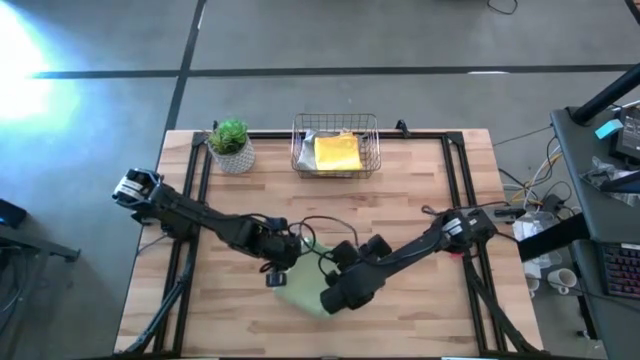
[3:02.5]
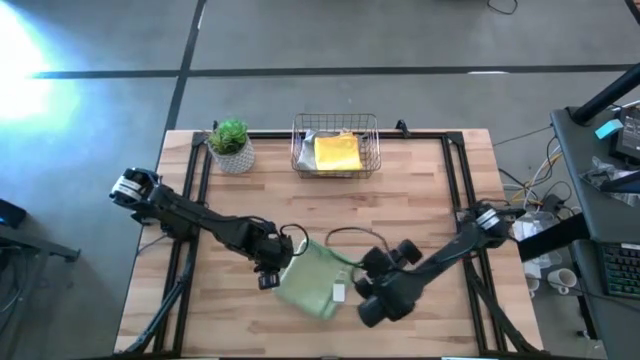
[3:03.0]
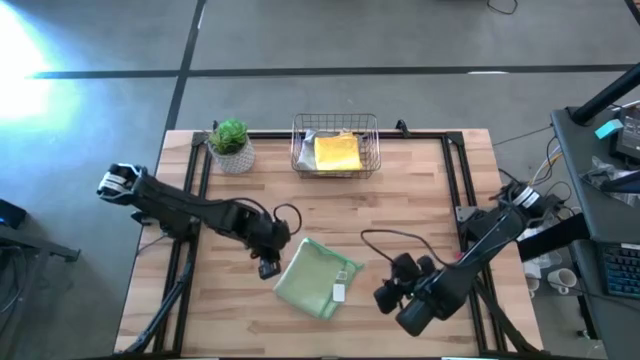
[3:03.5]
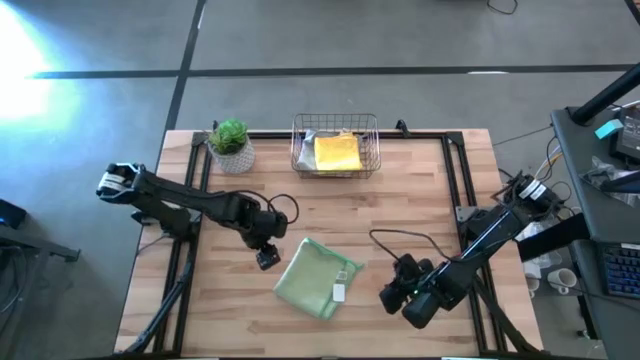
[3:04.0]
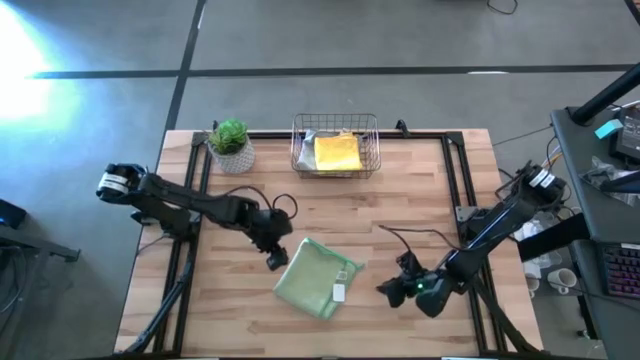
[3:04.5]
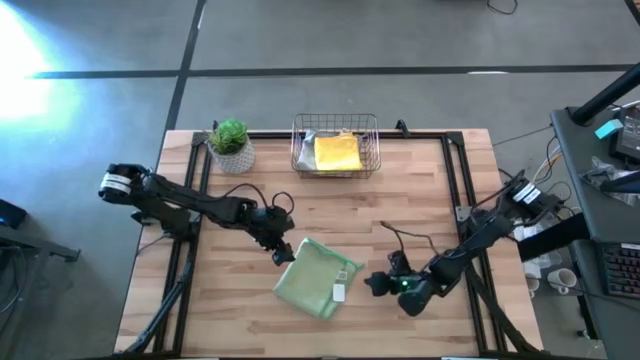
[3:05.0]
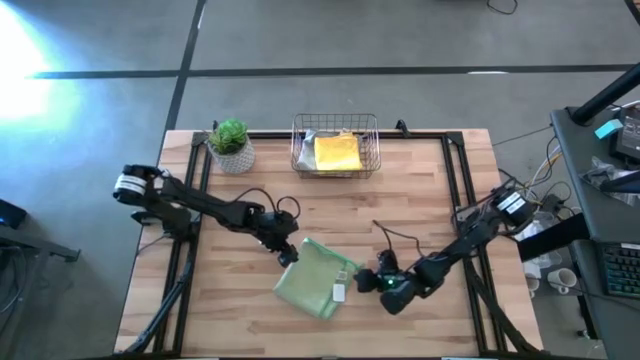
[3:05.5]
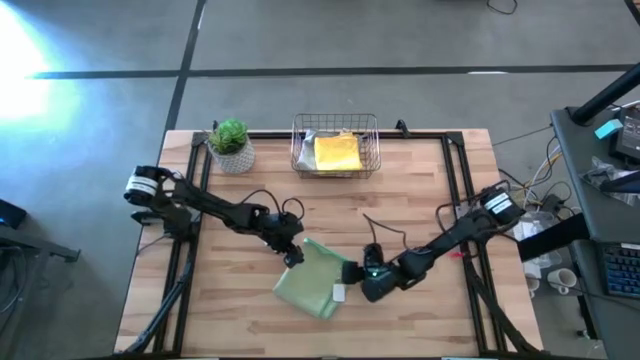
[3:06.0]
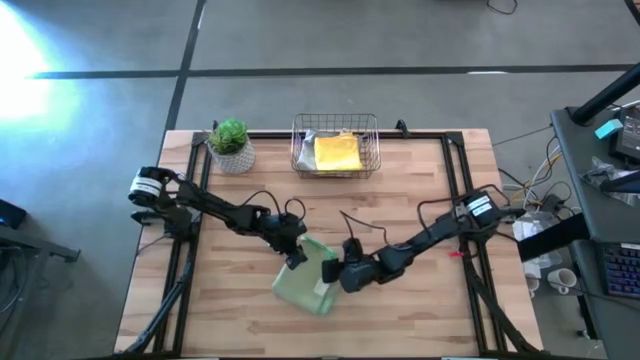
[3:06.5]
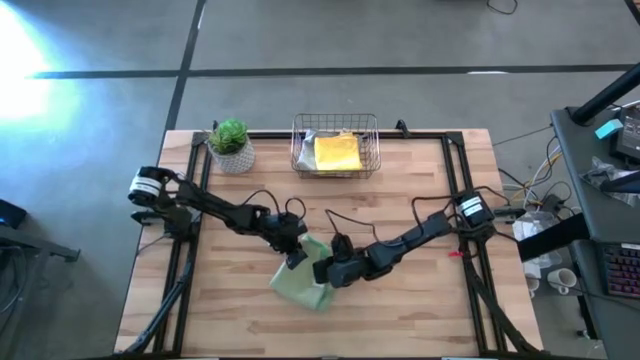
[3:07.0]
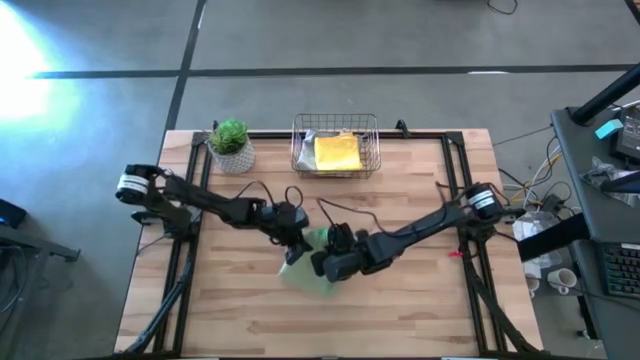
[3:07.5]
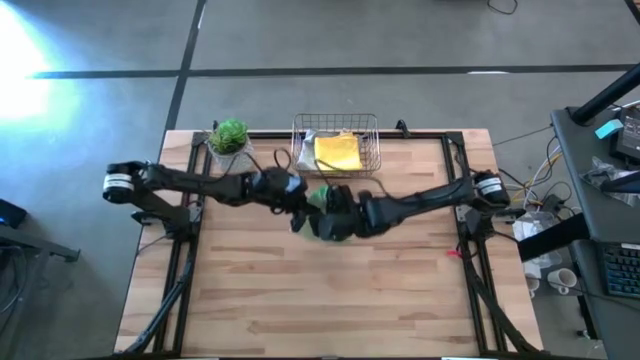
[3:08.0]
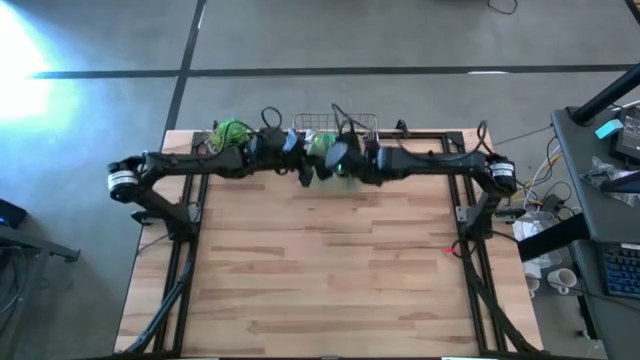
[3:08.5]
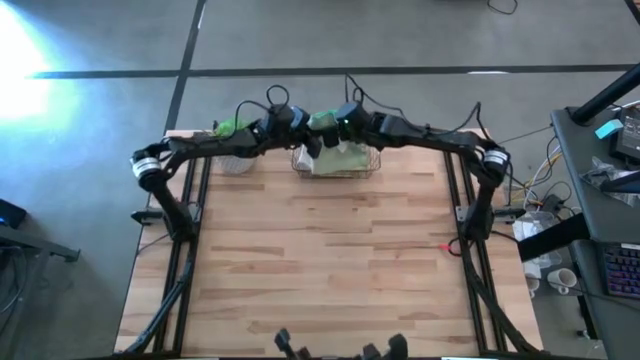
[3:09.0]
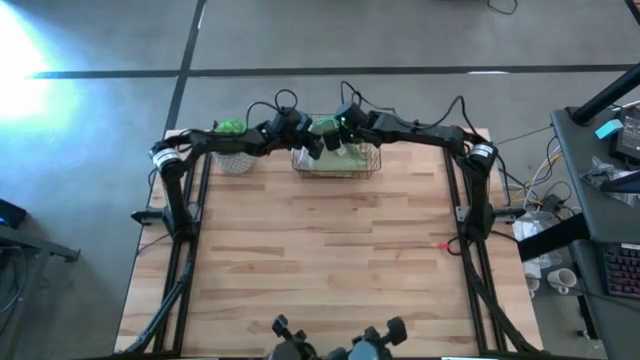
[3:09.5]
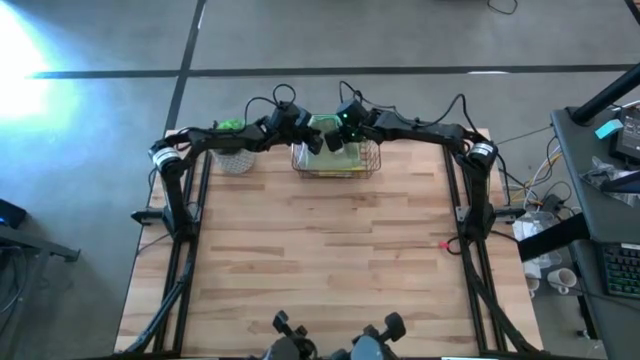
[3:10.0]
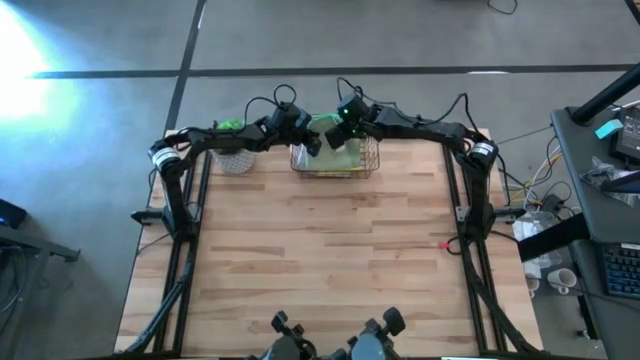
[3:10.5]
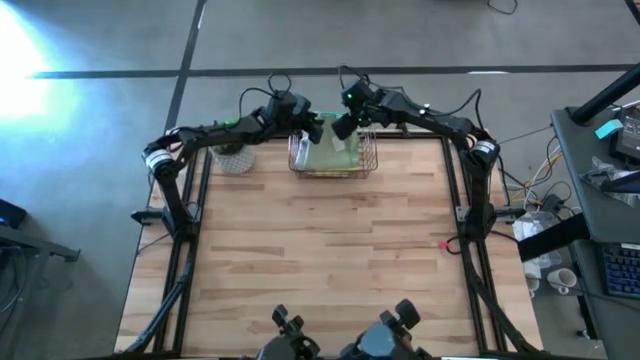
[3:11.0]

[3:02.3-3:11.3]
Task: Fold microfiber towels
Put the folded green towel into the wire basket

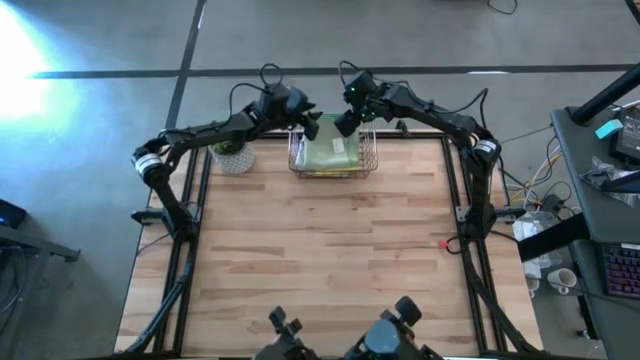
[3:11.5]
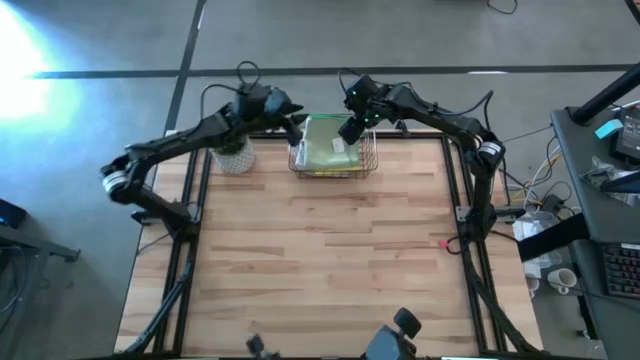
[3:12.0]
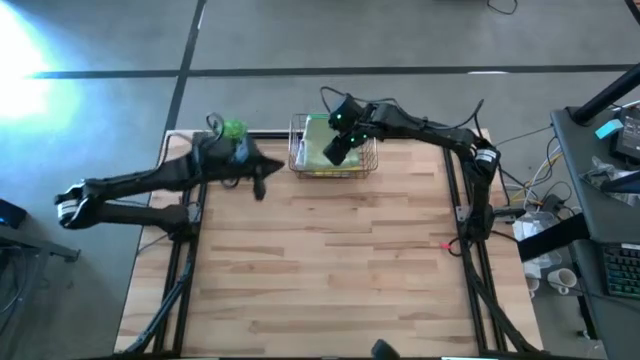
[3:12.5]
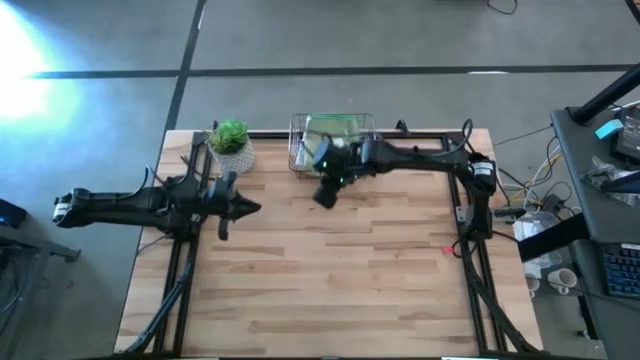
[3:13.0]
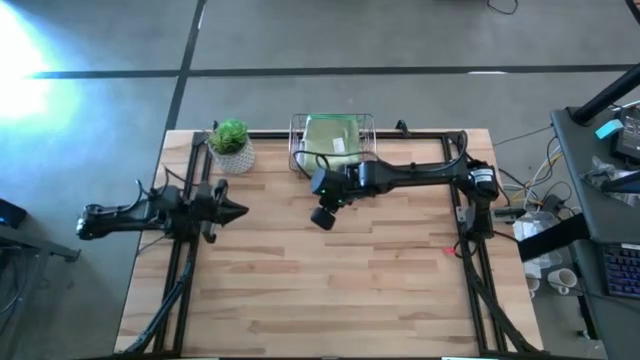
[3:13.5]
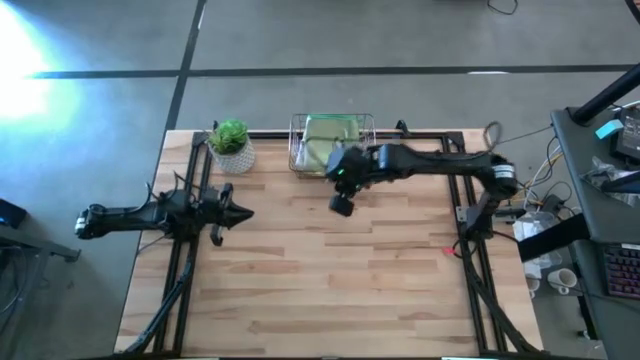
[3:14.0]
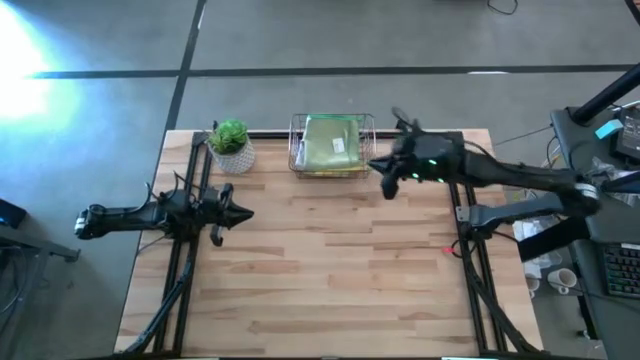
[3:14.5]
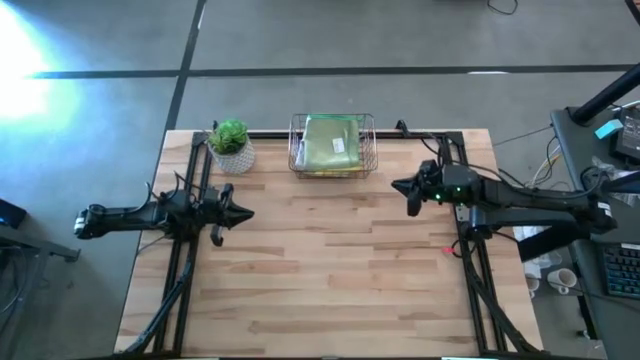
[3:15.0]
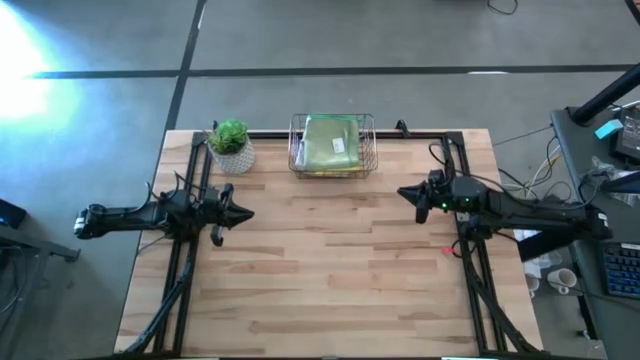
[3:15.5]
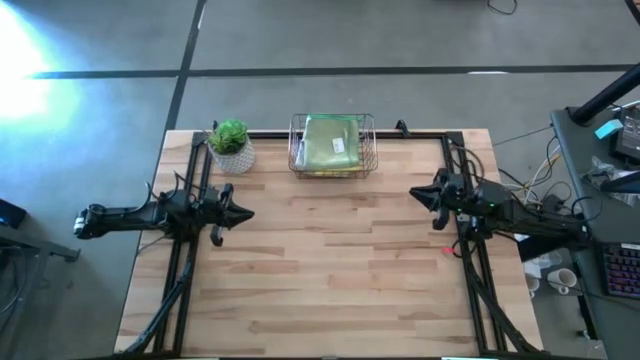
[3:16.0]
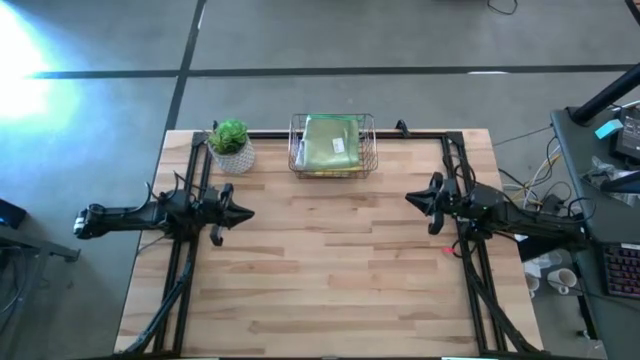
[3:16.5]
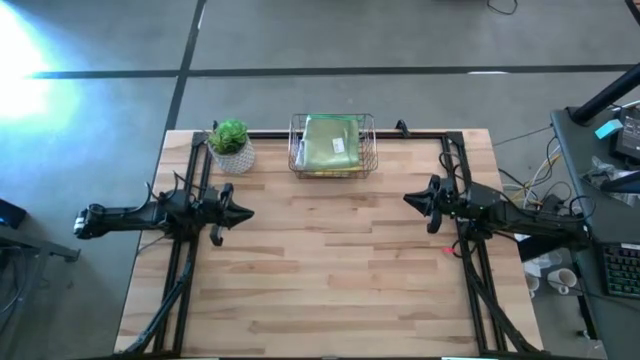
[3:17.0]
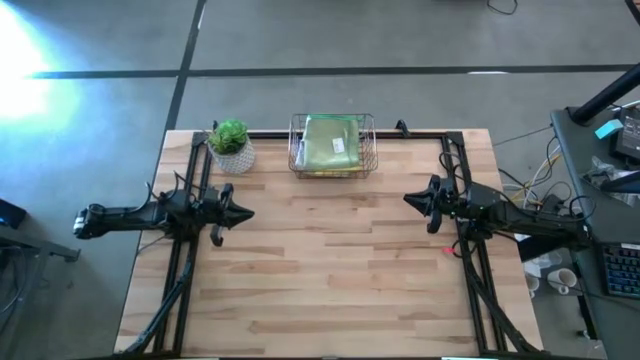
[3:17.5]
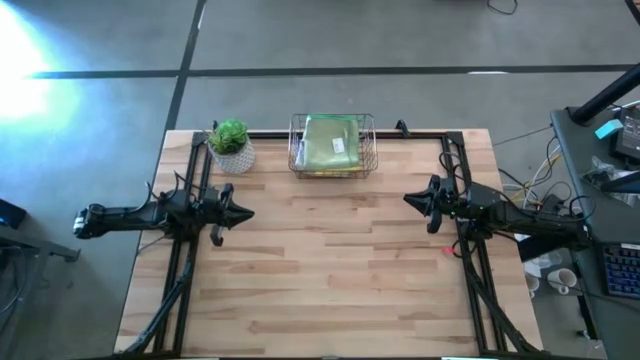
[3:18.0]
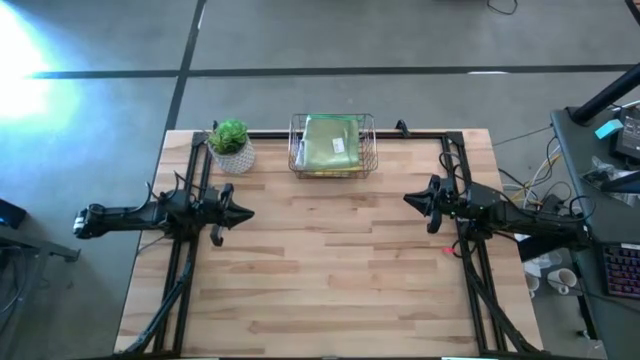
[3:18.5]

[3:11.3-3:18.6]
Return to Home Position

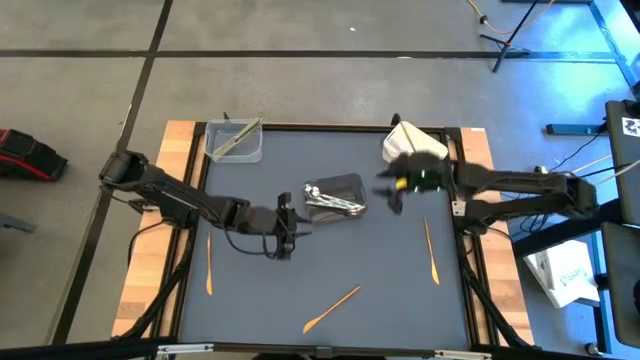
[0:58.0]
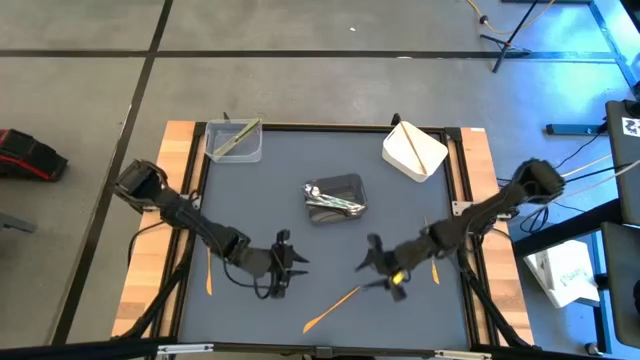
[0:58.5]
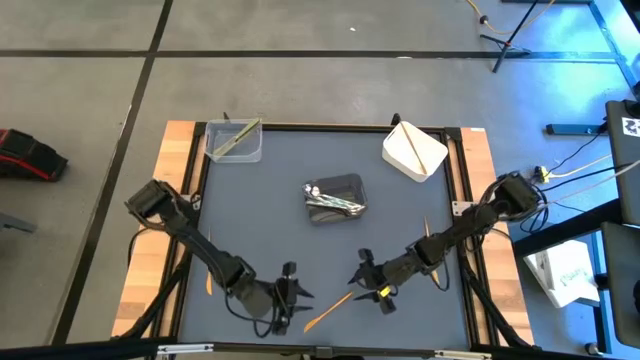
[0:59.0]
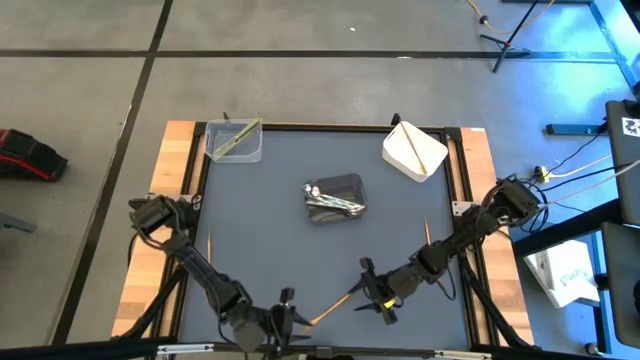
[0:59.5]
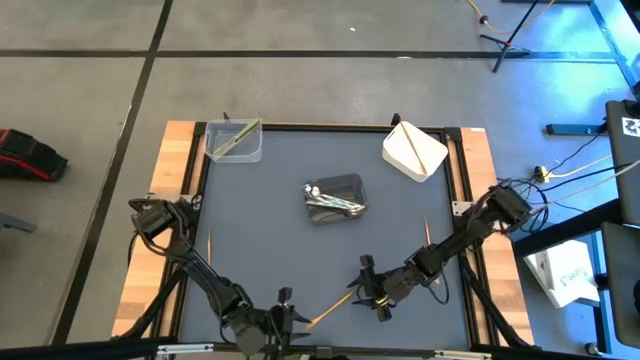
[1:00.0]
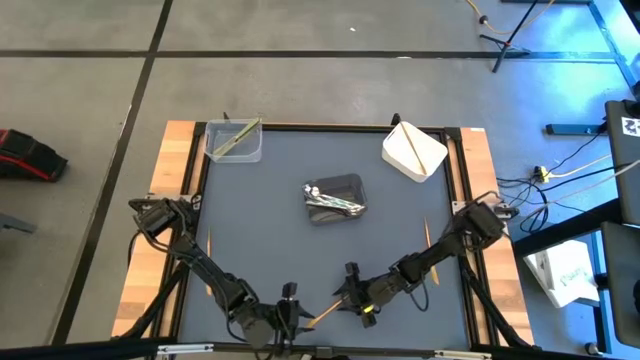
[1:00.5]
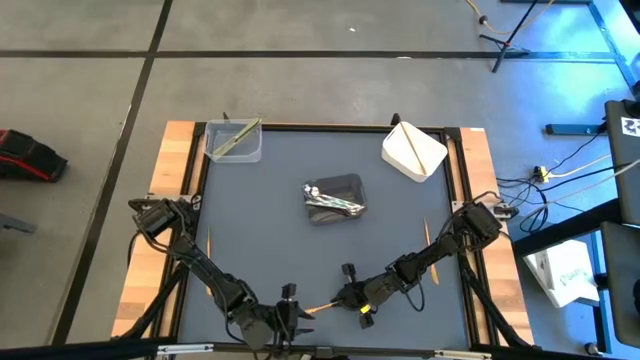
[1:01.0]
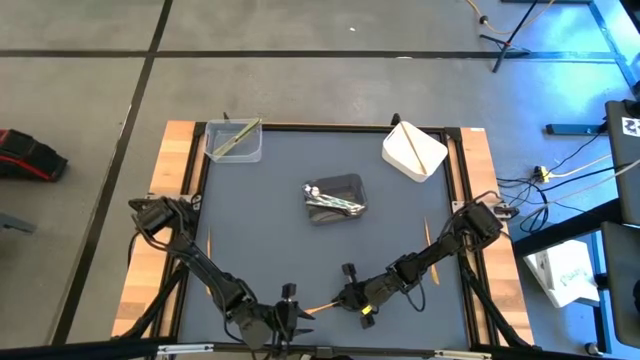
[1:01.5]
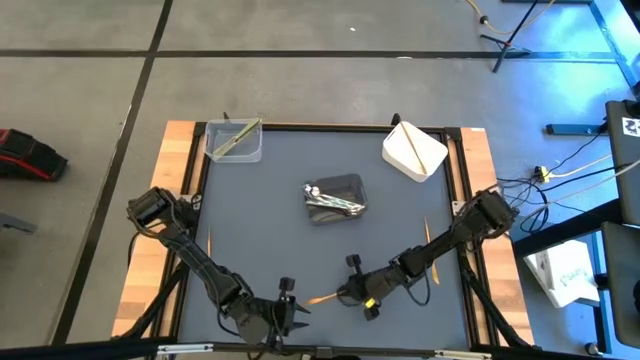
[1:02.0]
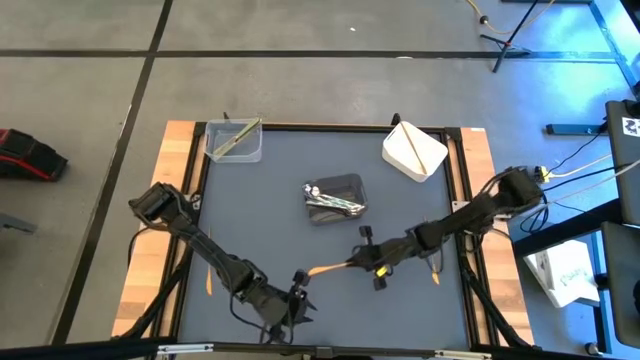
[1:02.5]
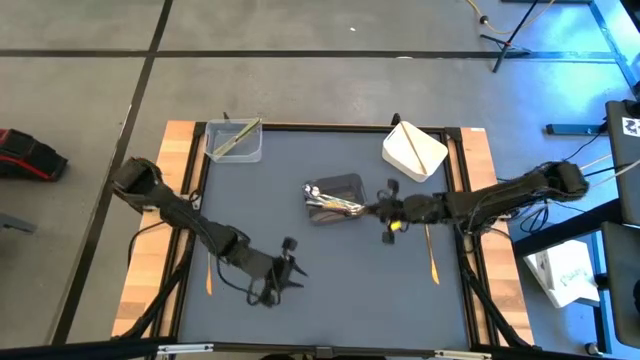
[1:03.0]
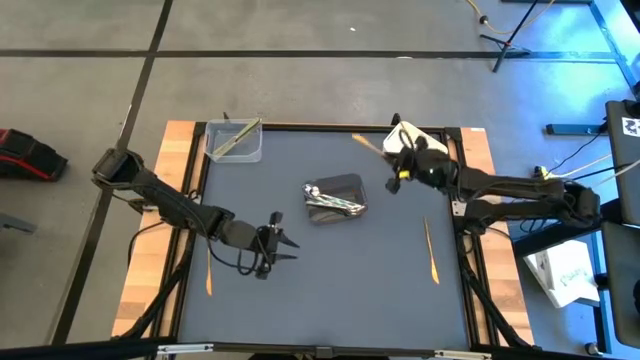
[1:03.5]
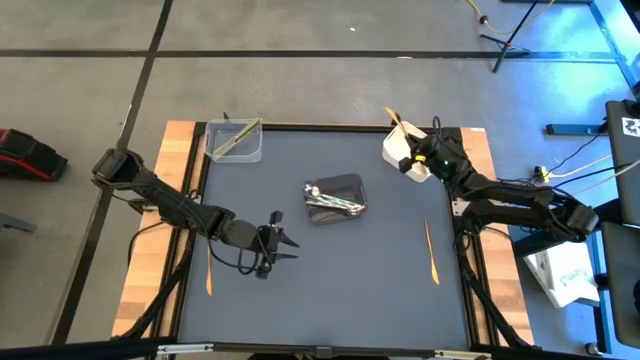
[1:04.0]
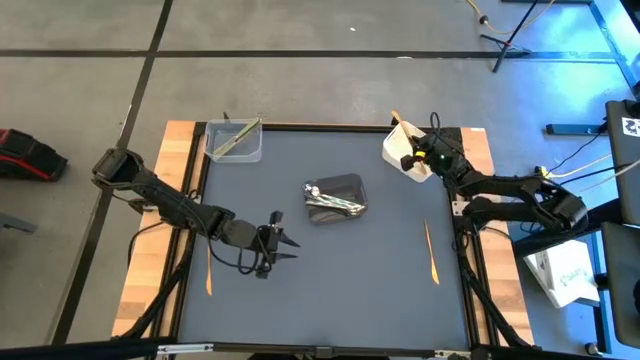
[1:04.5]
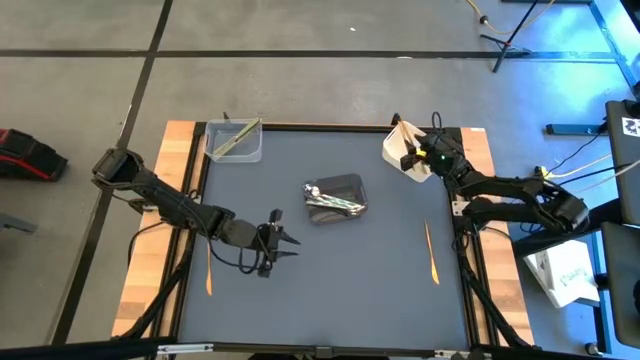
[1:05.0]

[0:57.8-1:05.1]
Task: Sort silverware by color (type)
Put the bottom gold table knife into the white bin
